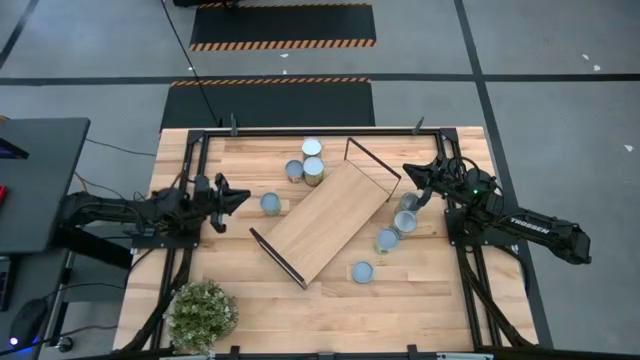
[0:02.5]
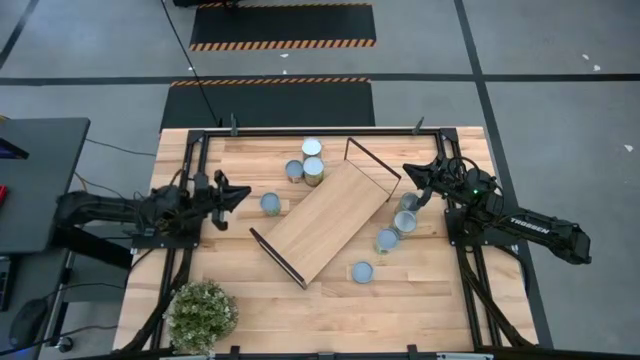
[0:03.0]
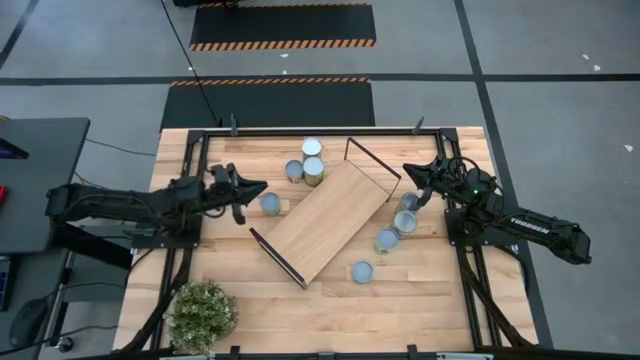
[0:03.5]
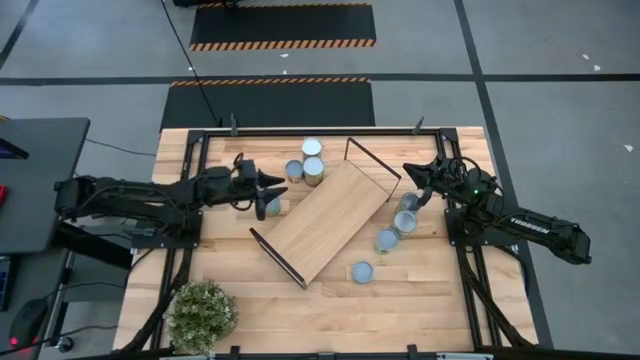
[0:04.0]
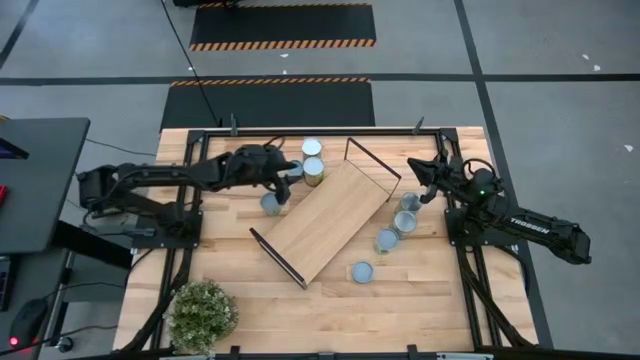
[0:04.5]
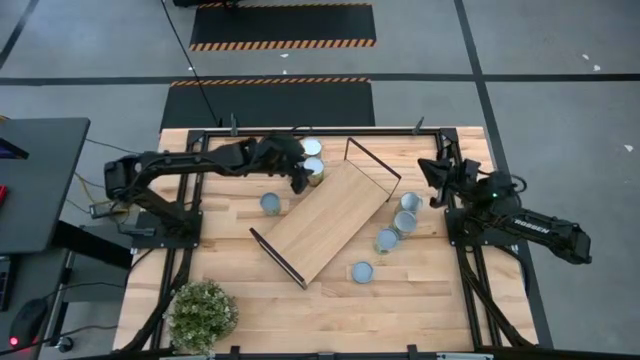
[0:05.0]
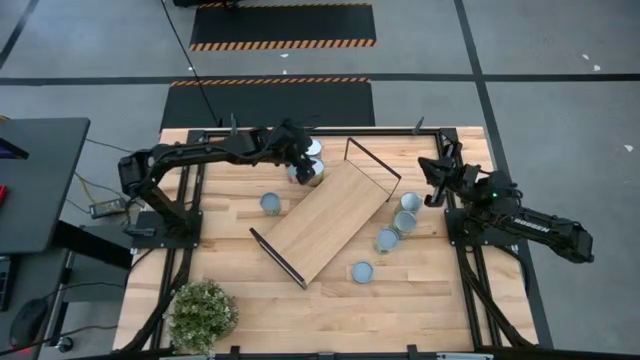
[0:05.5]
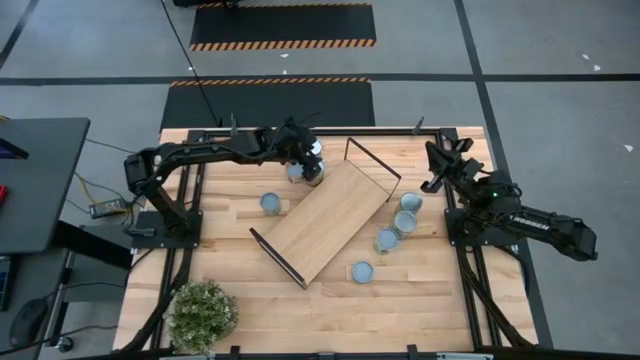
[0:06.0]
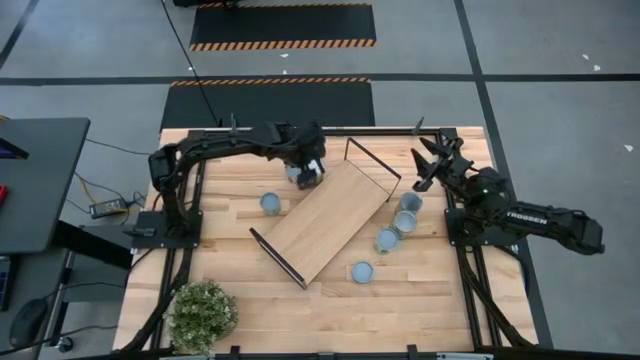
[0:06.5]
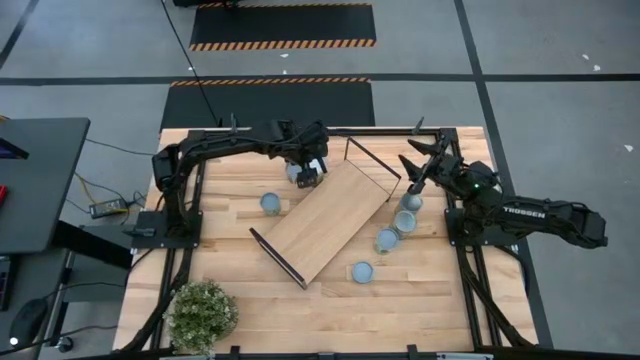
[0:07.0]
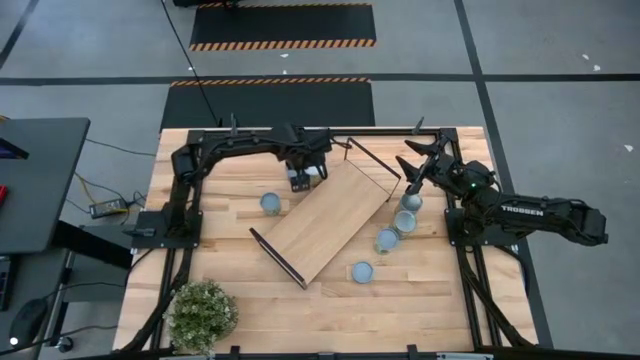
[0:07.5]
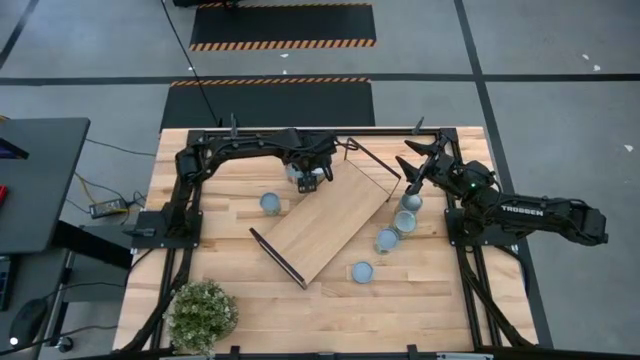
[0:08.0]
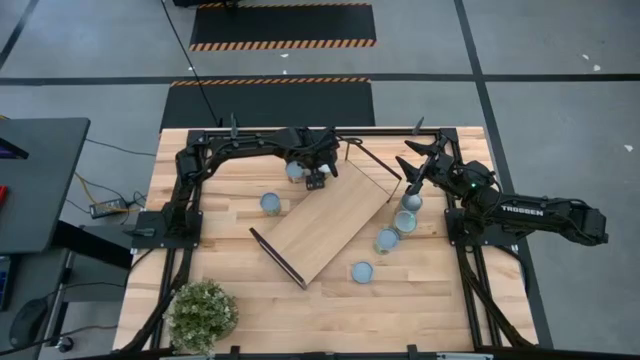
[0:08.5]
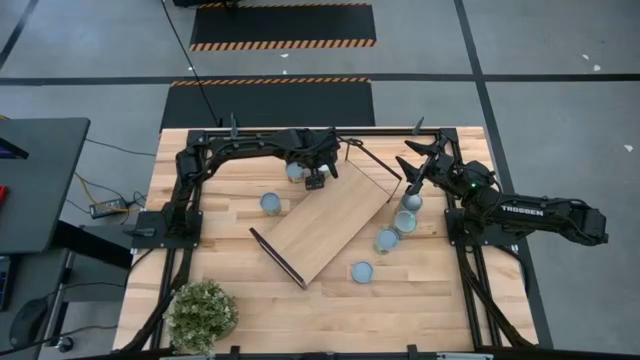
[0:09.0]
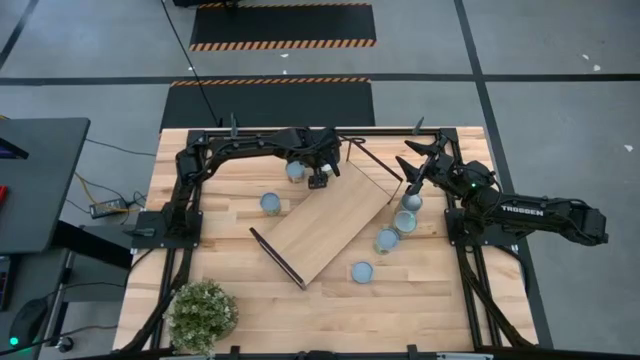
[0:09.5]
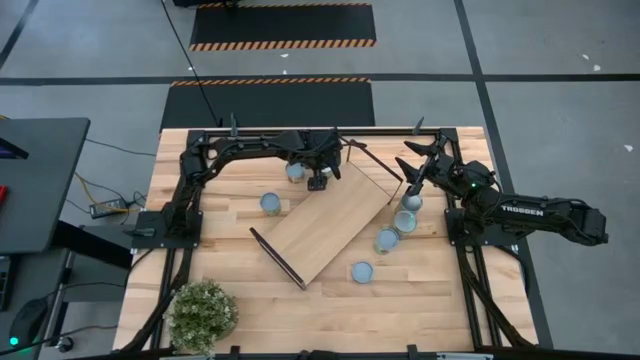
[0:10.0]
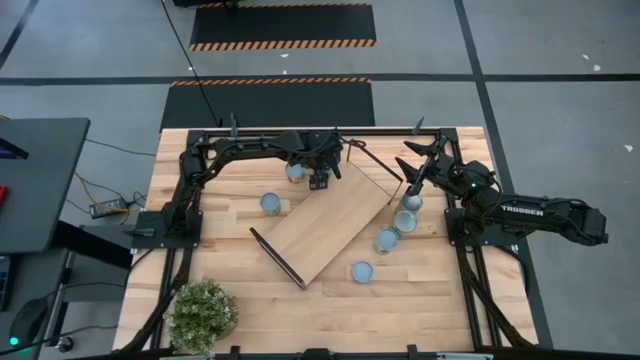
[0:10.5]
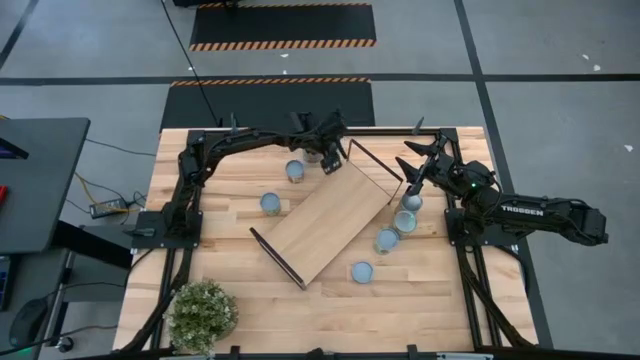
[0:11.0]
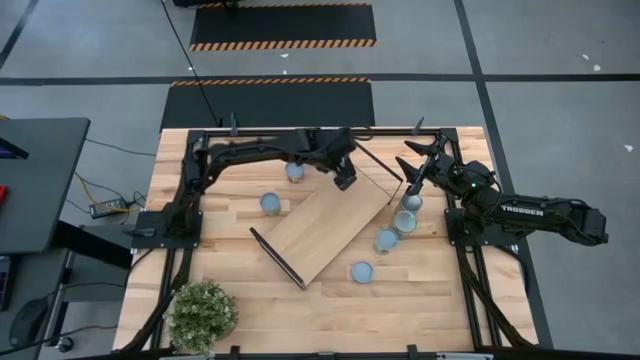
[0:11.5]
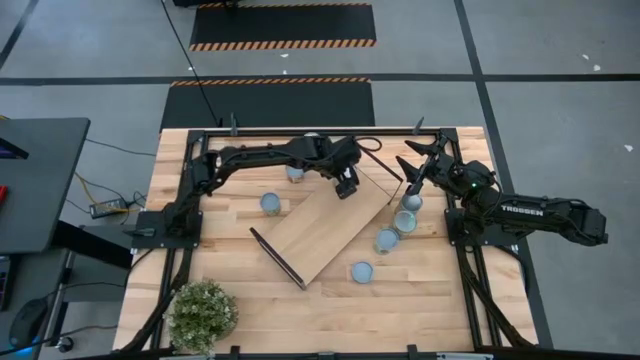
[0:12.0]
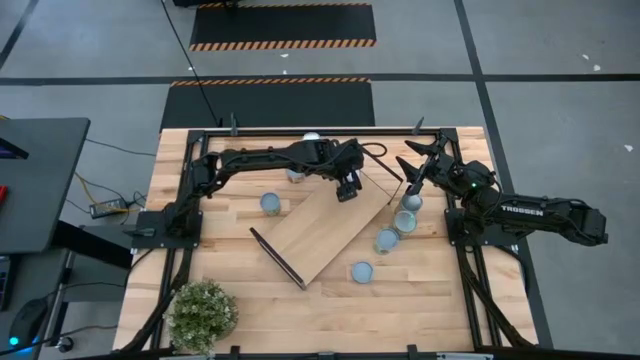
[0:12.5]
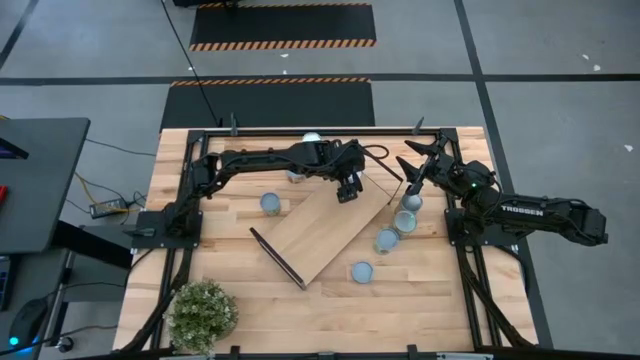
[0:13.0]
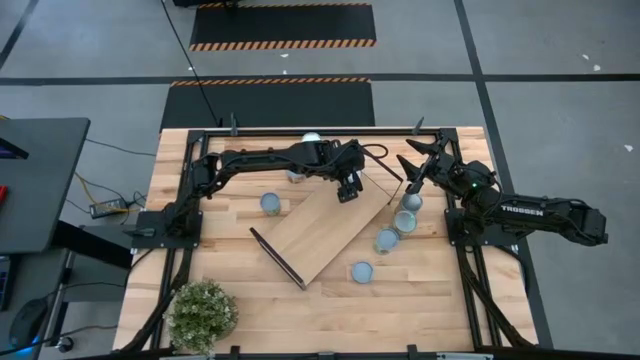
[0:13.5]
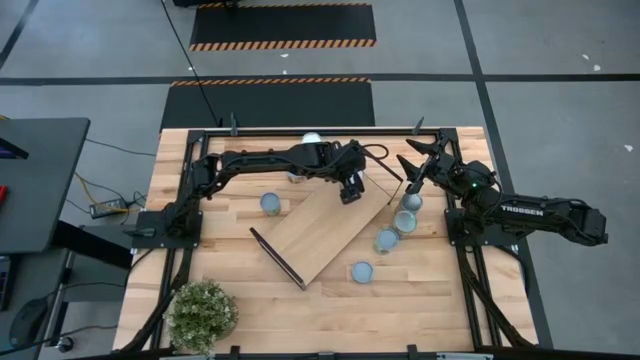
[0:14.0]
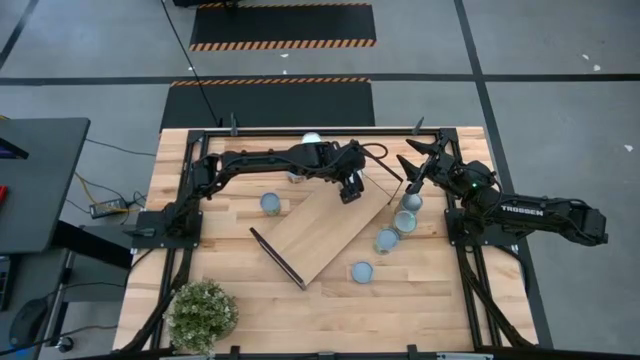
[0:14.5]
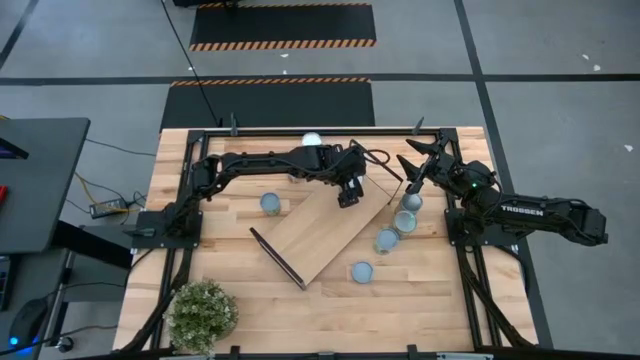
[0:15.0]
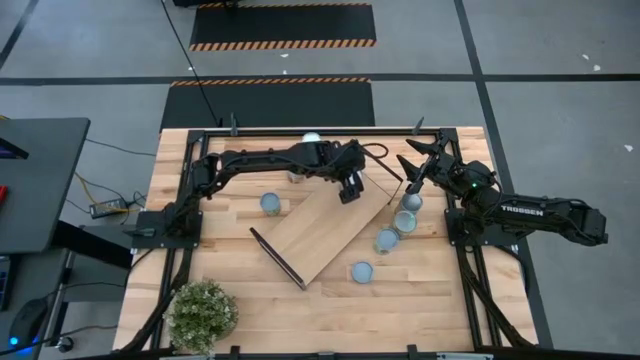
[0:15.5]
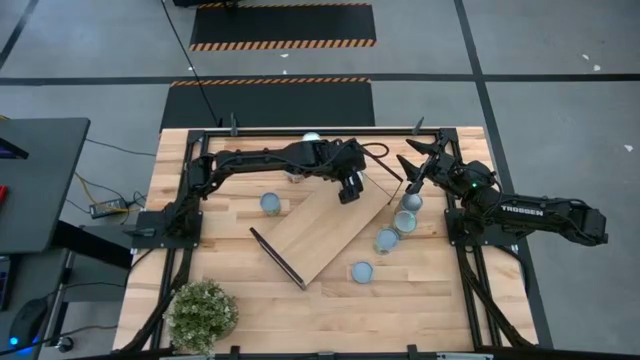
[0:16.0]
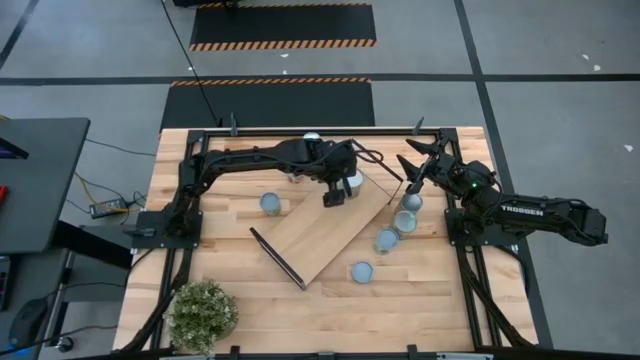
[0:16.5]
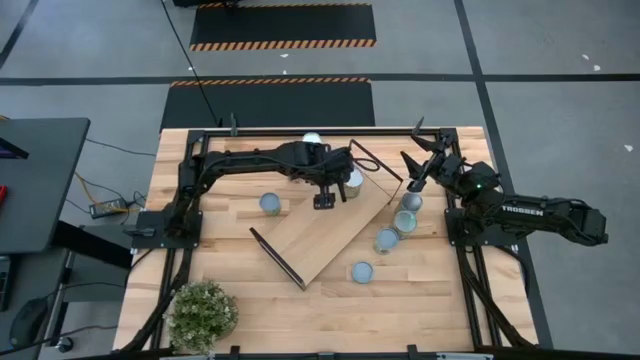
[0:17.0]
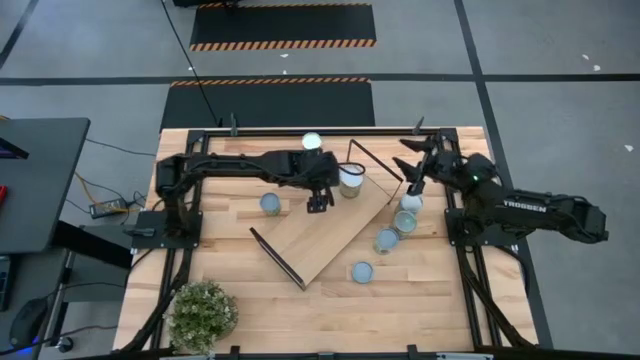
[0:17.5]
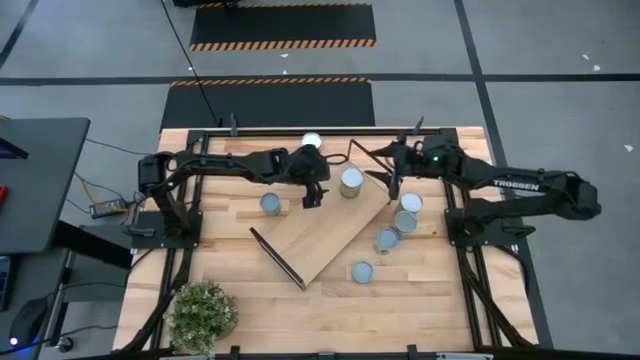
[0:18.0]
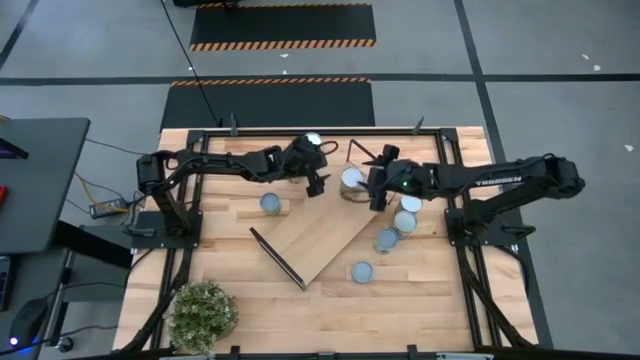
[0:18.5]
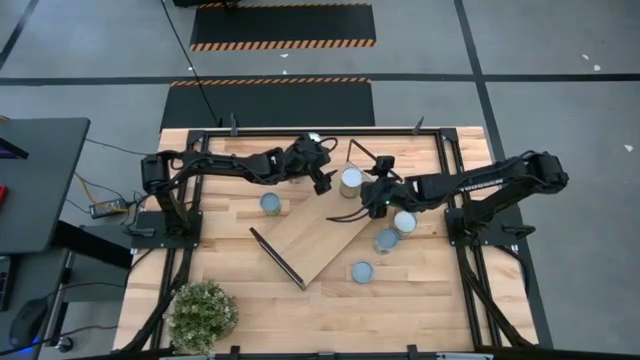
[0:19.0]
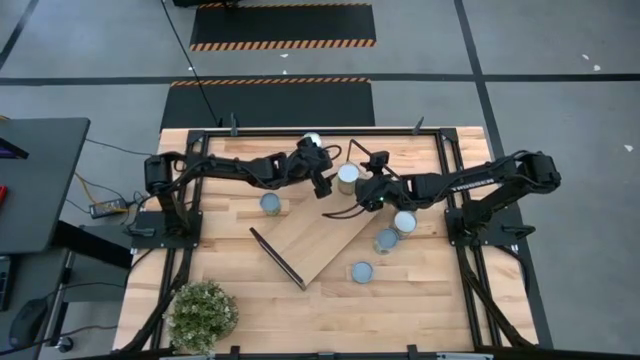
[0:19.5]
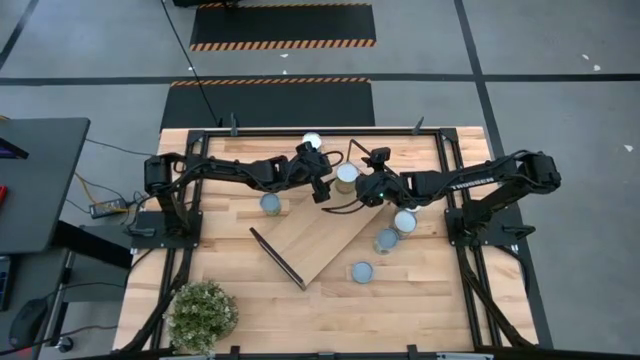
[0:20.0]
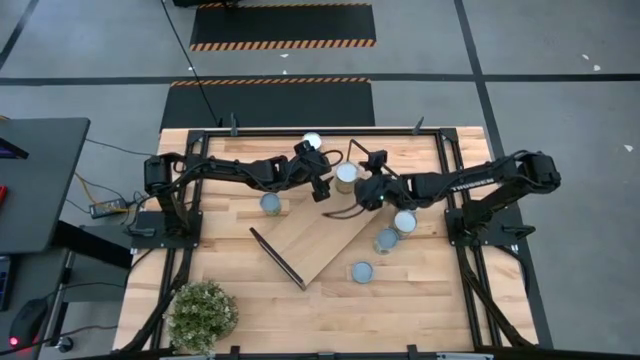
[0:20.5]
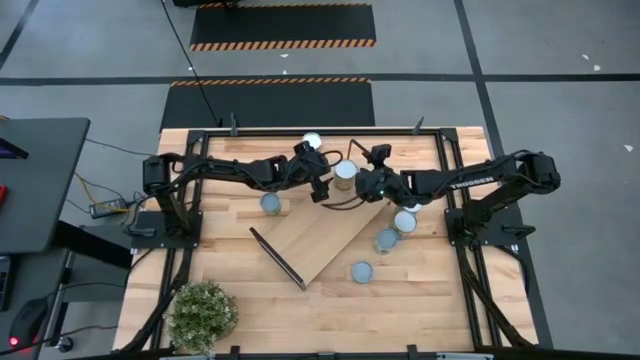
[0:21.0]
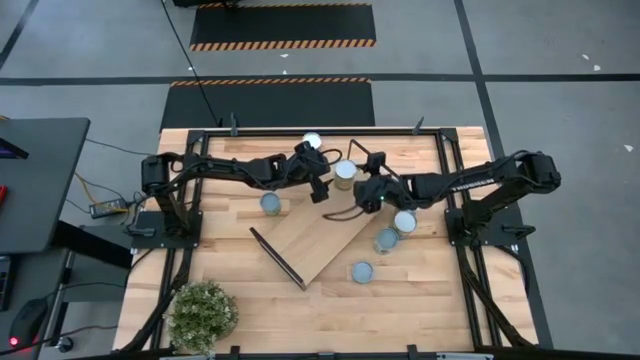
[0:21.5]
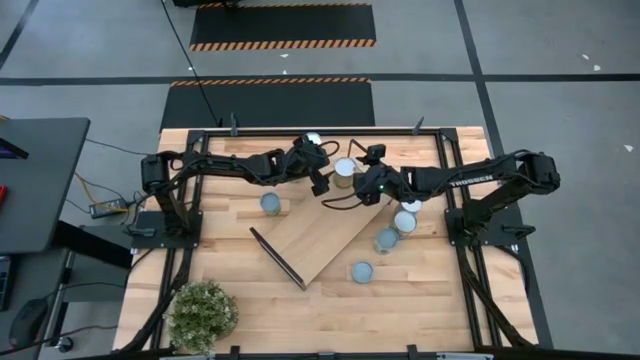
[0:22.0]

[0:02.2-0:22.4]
Task: Pick and place cans onto a shelf
Put the left green fruit can on the shelf
